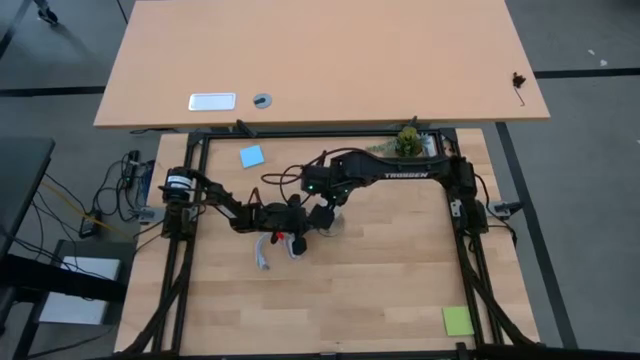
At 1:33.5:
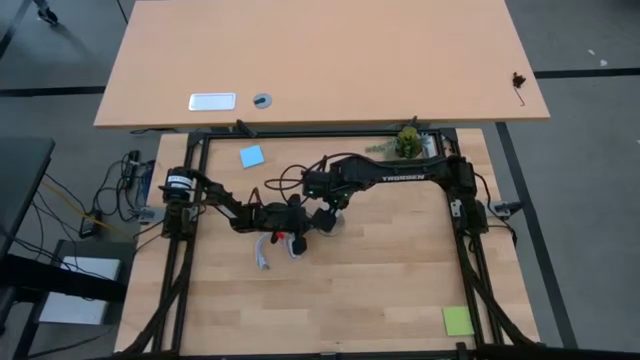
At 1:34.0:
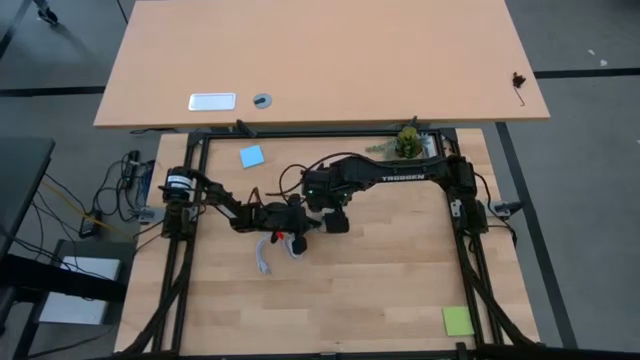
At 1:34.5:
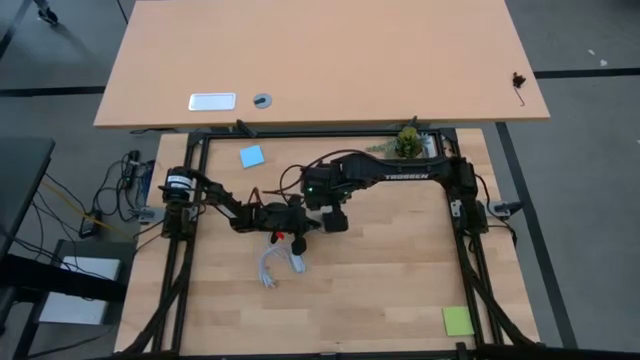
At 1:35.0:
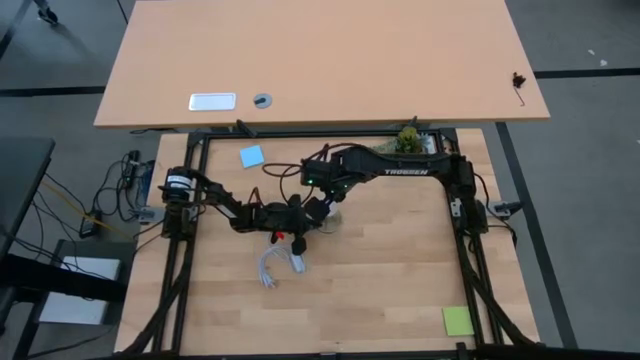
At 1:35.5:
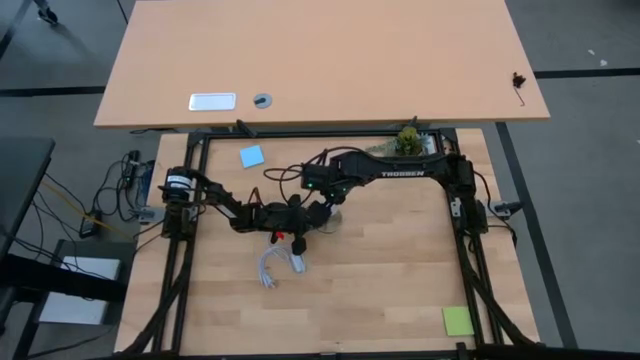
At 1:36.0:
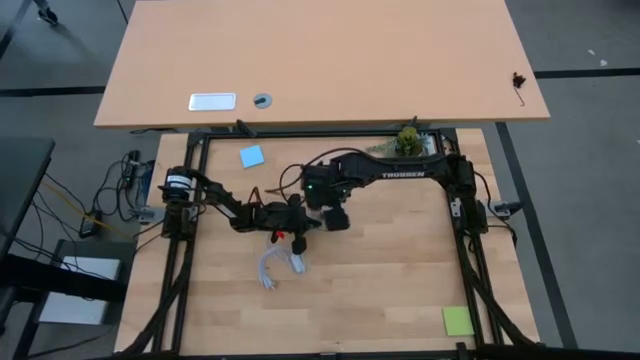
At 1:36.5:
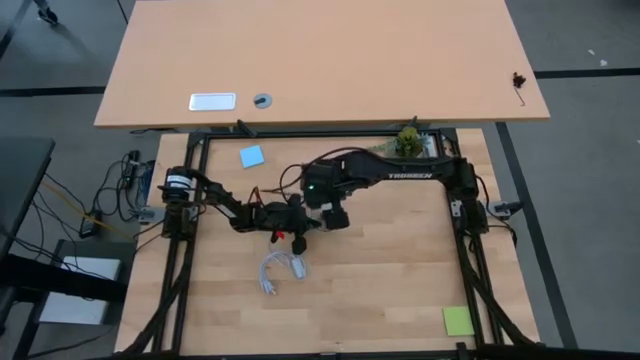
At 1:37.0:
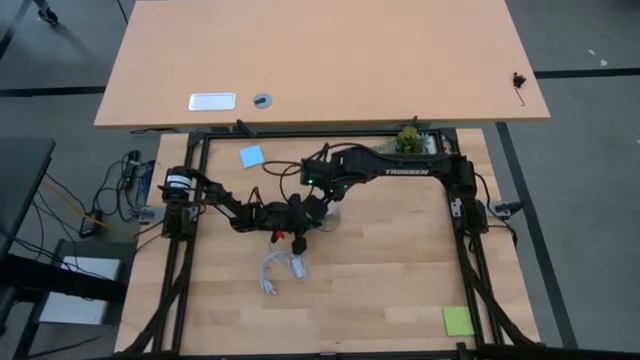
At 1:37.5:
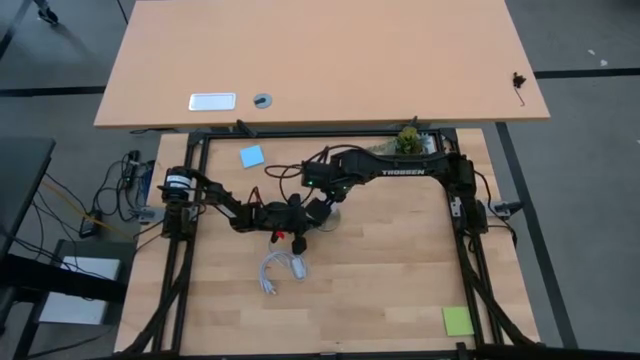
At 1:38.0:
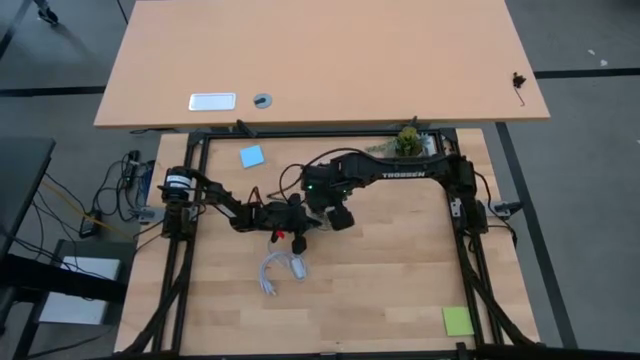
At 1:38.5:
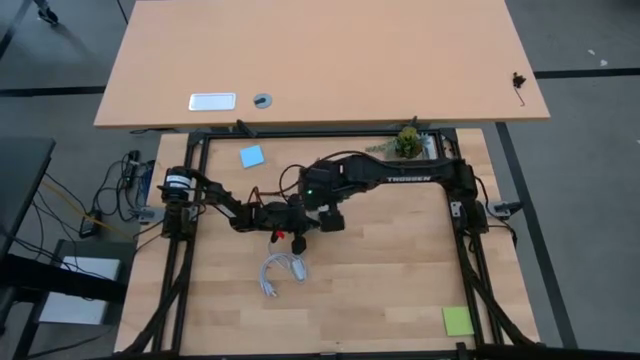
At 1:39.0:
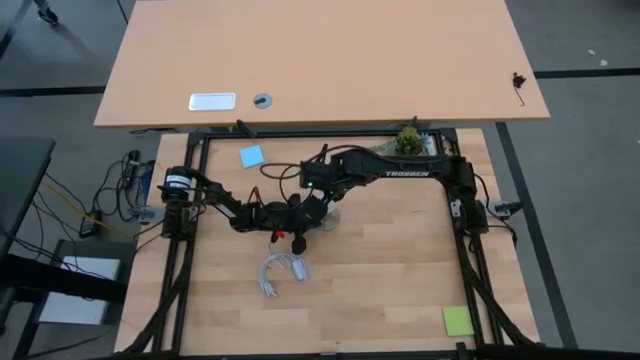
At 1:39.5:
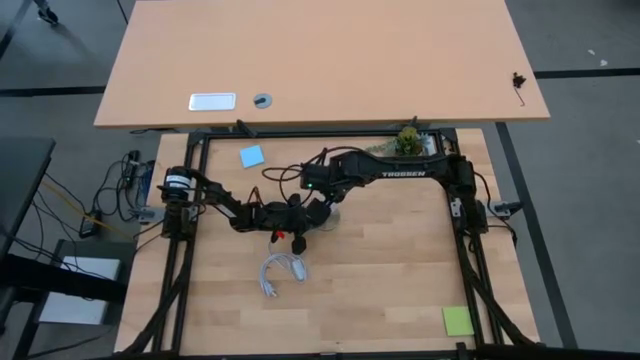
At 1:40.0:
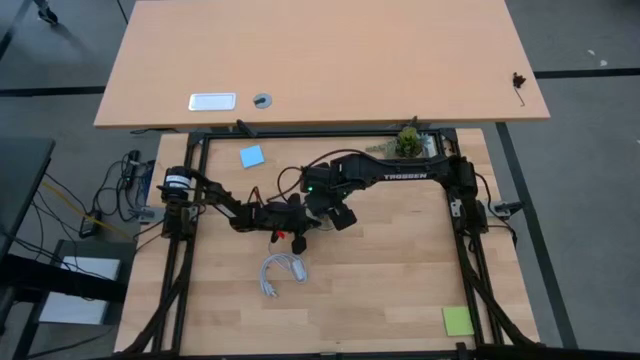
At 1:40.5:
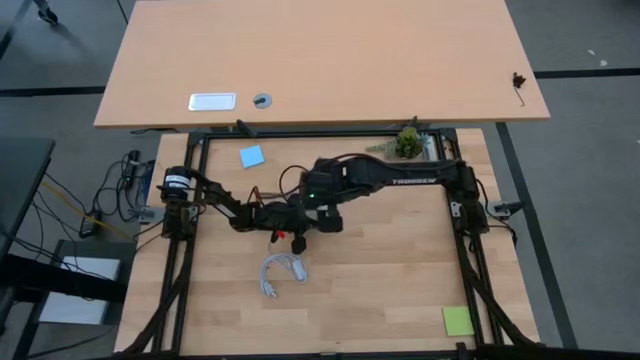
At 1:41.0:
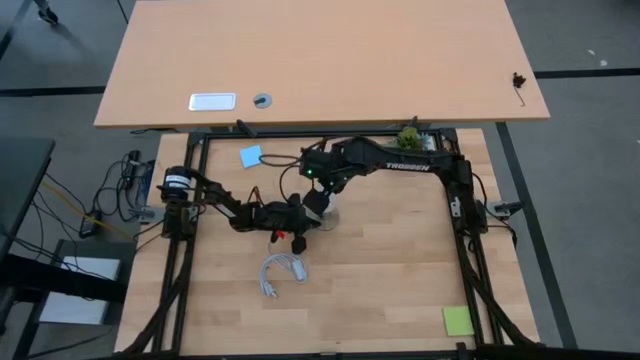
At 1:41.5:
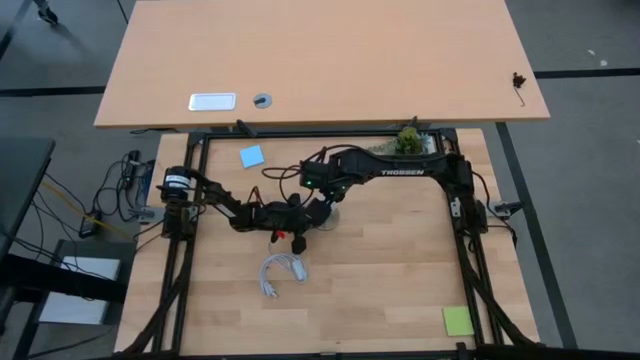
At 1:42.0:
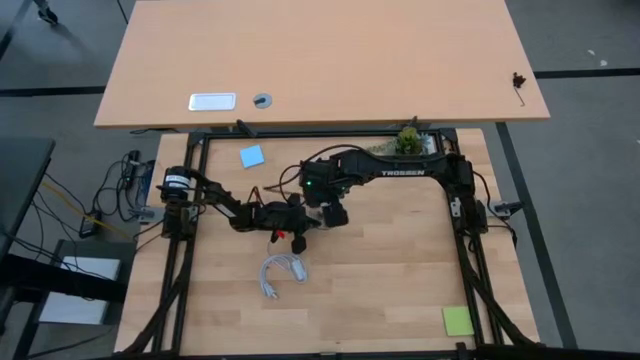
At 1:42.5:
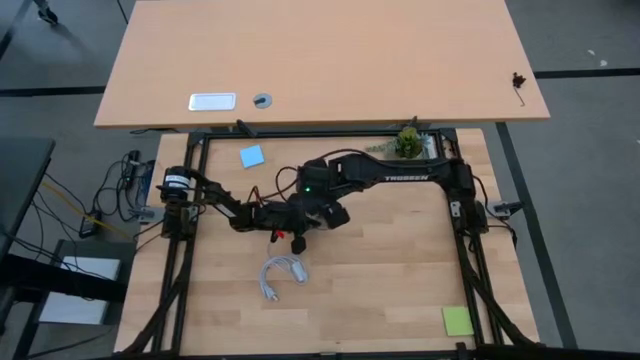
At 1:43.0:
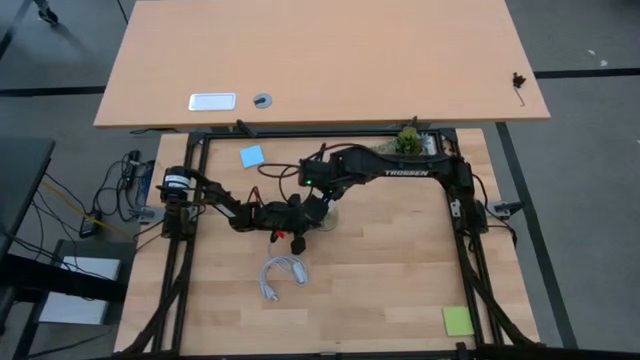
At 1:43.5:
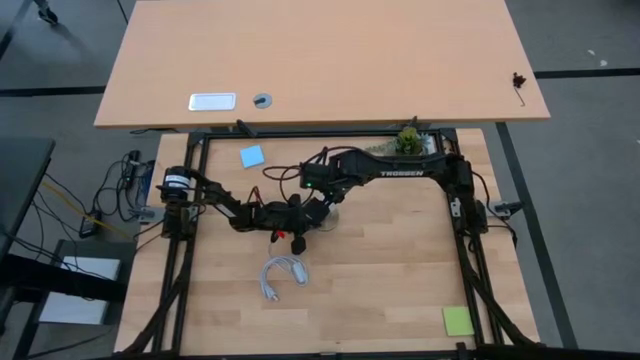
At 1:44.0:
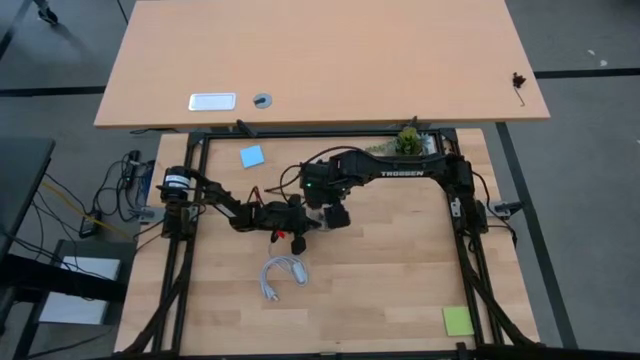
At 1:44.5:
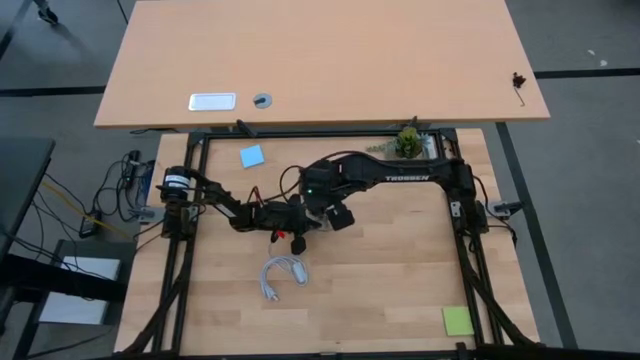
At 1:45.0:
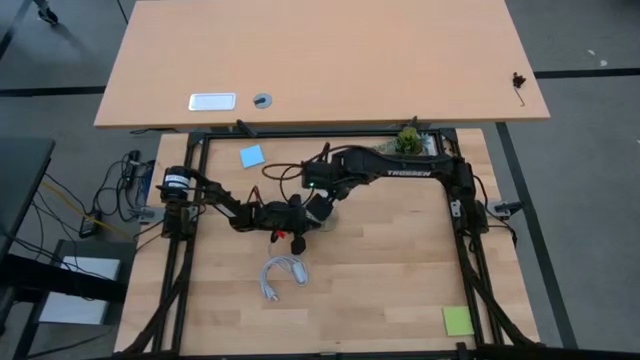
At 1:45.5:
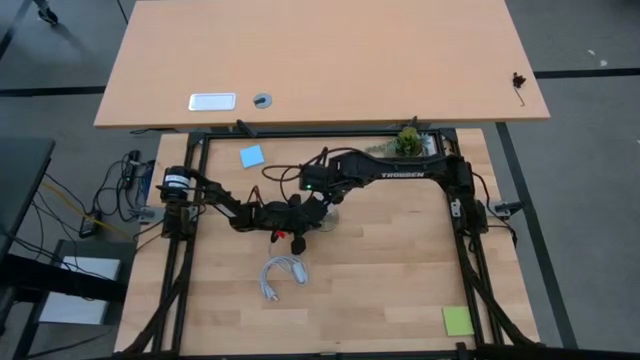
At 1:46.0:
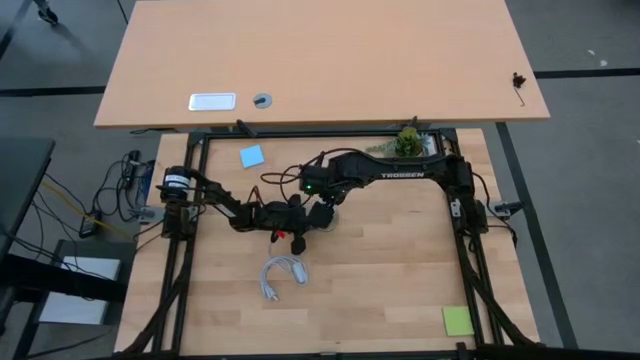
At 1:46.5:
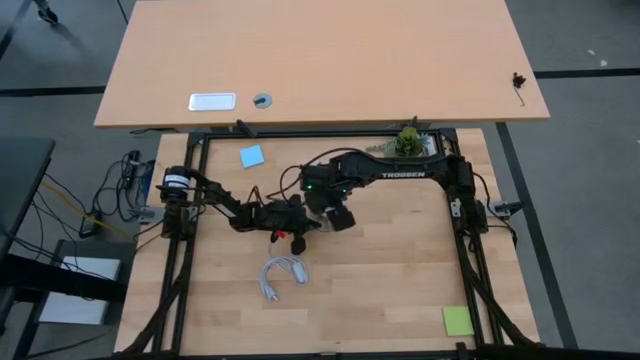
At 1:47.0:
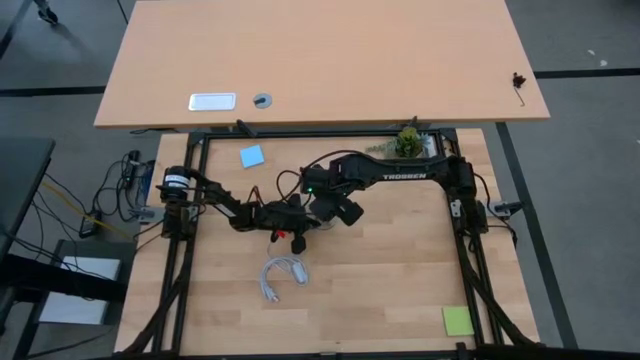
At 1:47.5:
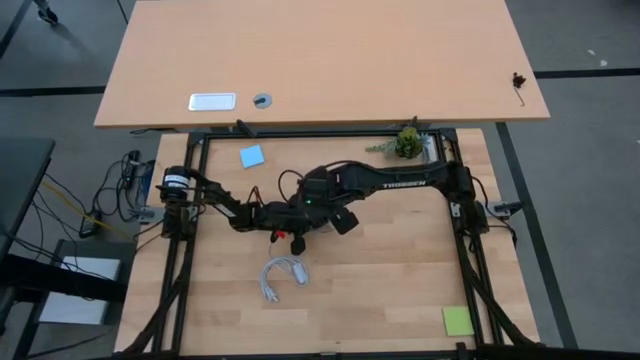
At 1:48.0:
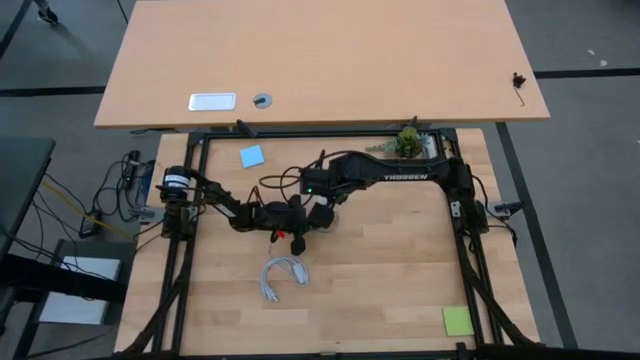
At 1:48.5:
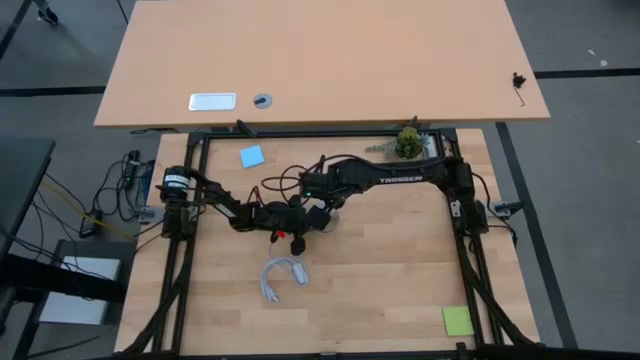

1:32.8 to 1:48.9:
Task: Screw lightbulb
Remove the light bulb from the lamp
